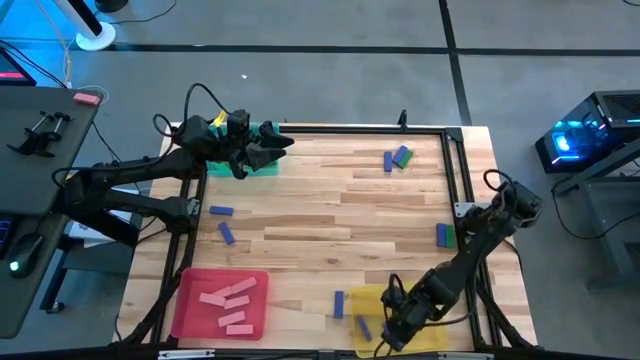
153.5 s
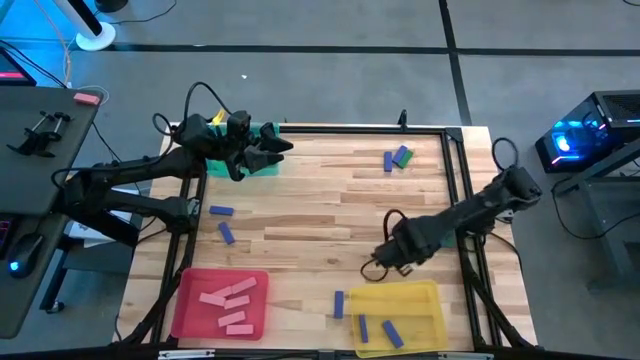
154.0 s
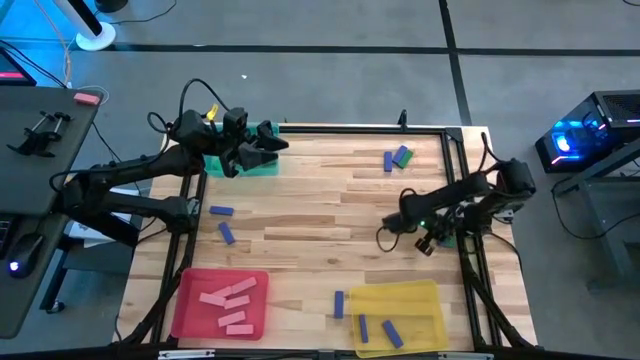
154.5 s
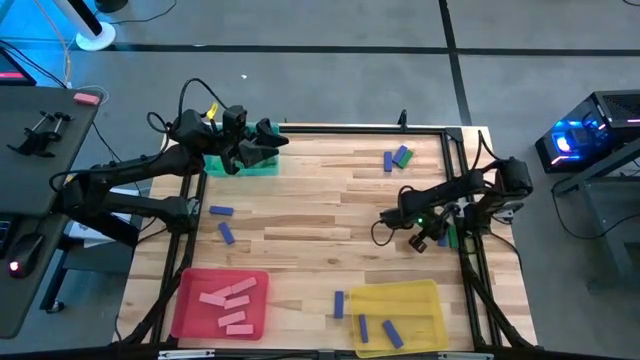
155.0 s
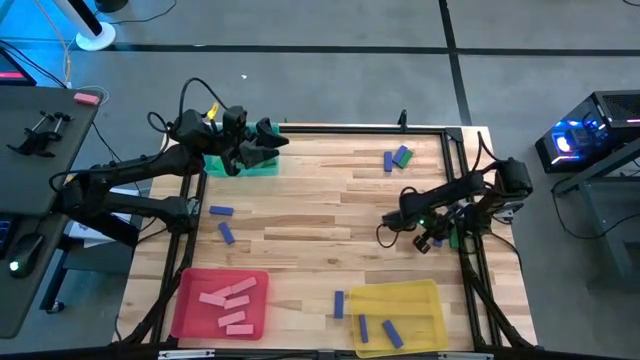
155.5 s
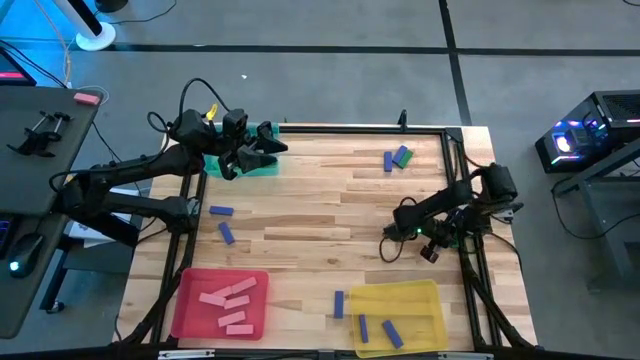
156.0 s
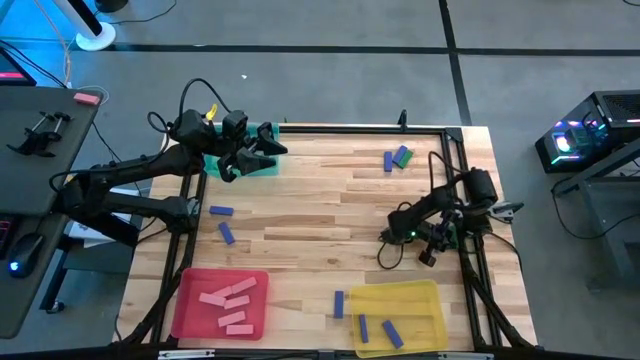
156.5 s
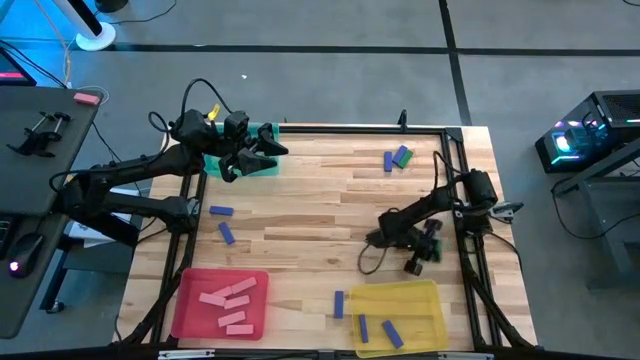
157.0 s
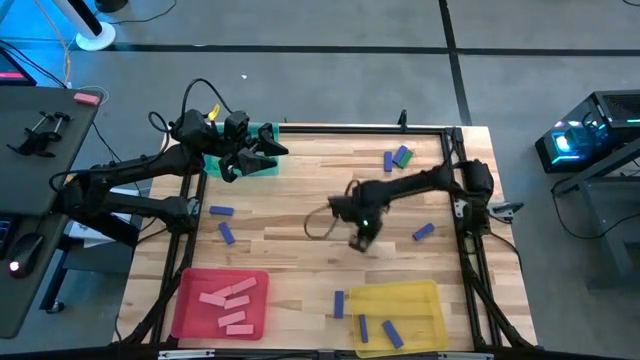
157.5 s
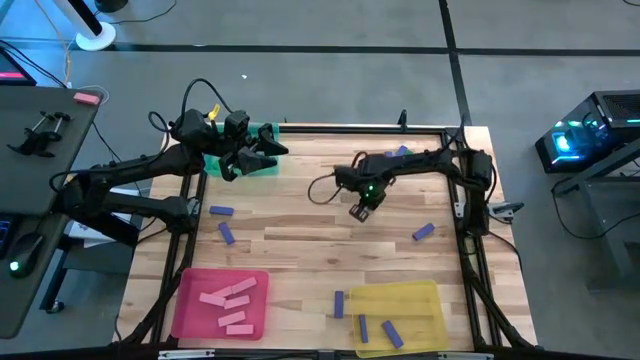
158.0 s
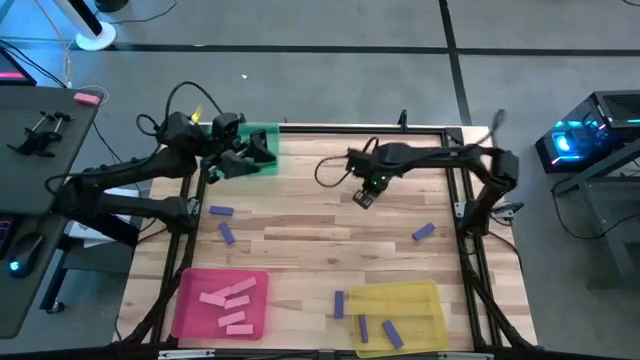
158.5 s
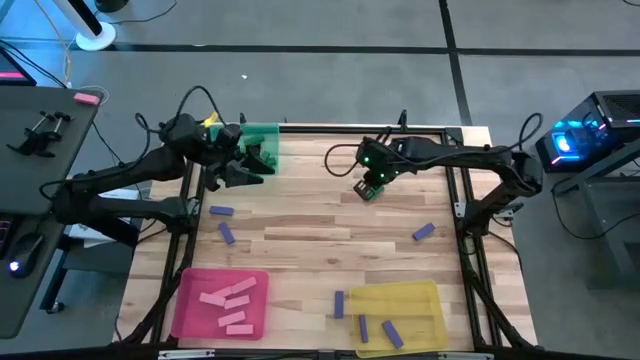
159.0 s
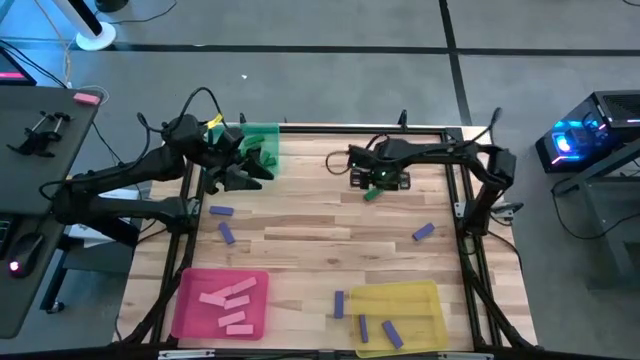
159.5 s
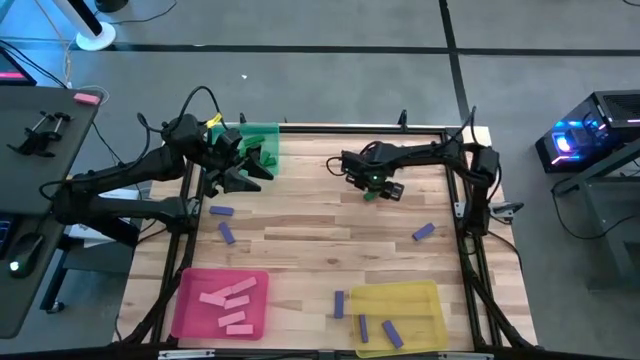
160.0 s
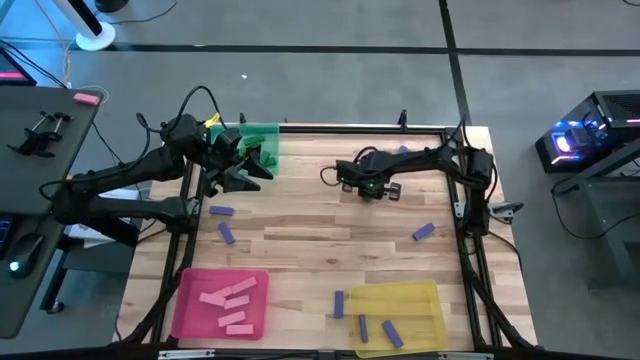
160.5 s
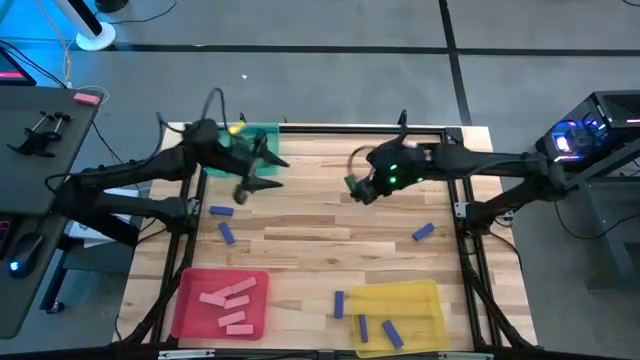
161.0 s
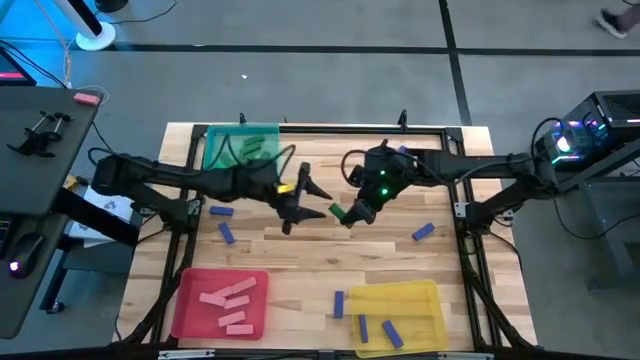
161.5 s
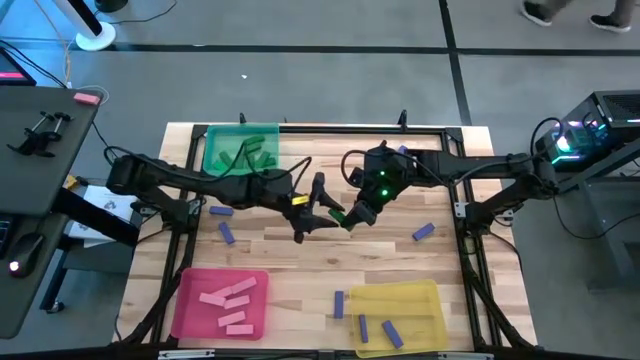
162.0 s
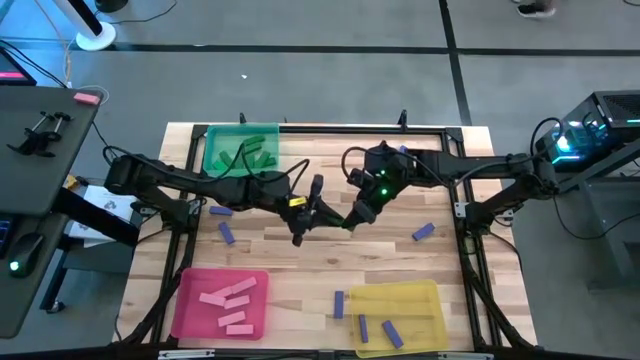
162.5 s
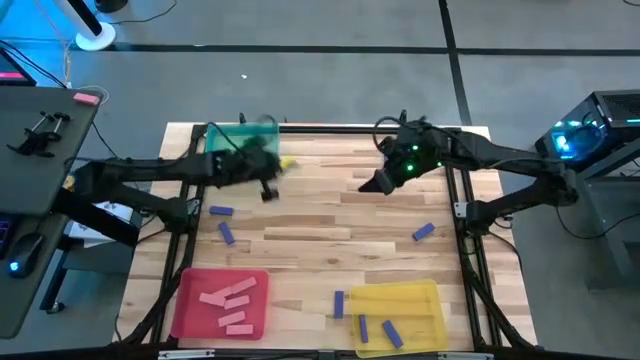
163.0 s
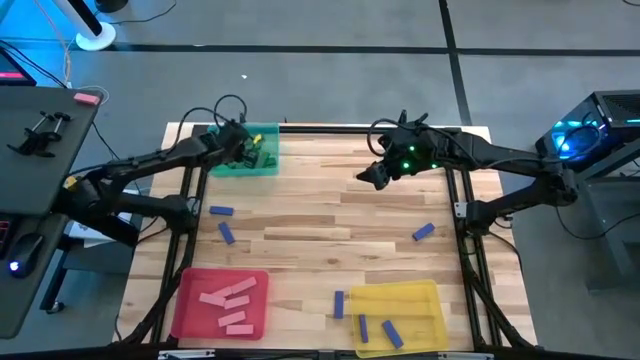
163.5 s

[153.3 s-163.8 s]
Task: Sort blocks
Put the green block into the green bin

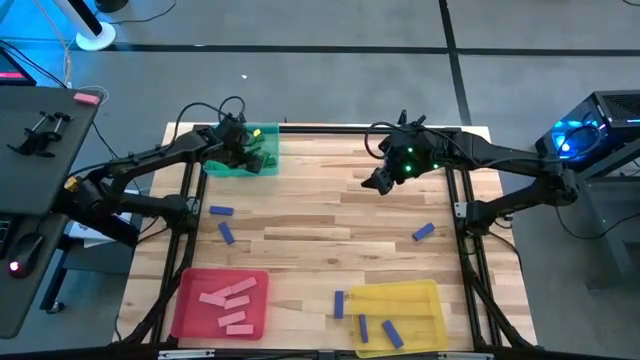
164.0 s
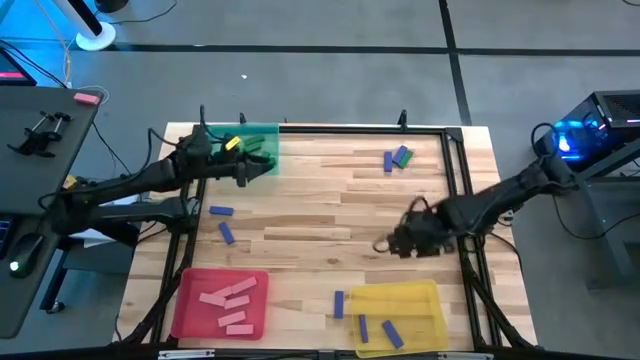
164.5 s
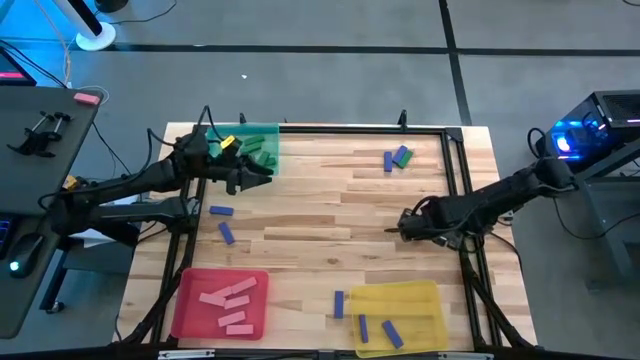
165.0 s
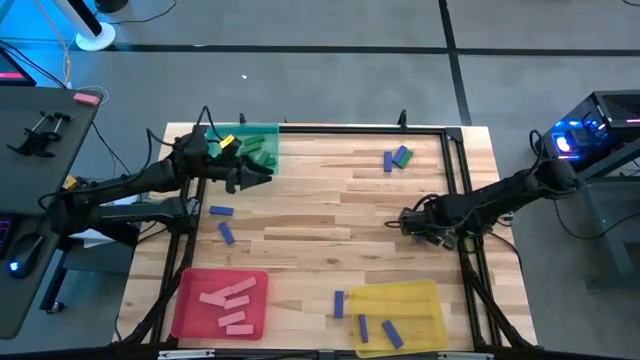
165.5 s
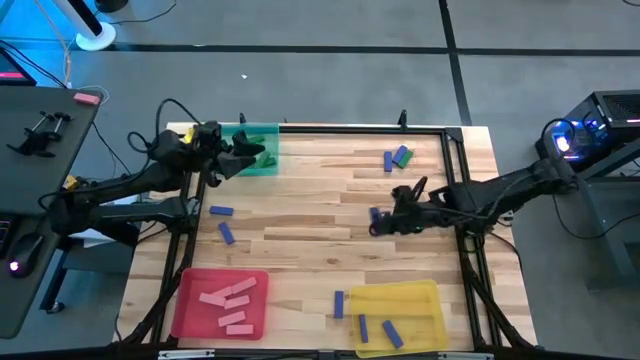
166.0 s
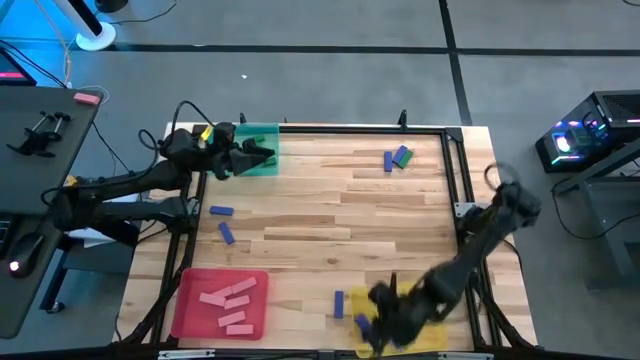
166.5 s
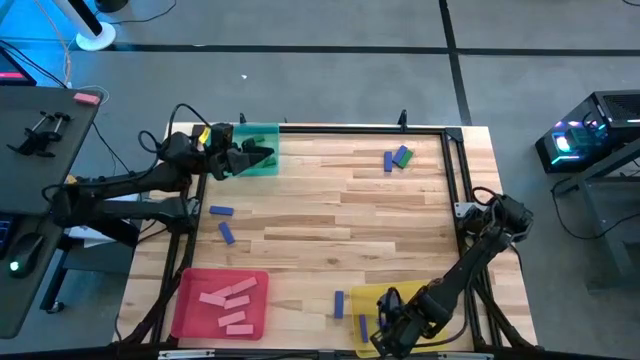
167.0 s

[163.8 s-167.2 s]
Put the blue block into the yellow bin

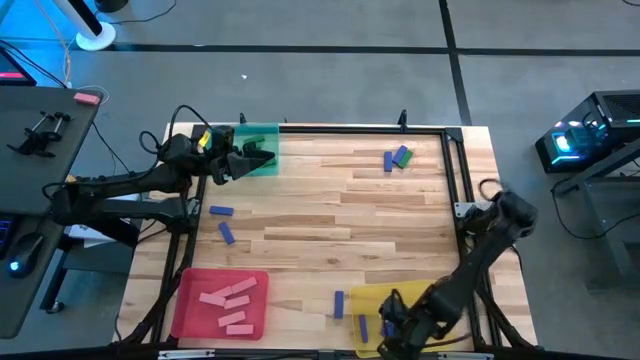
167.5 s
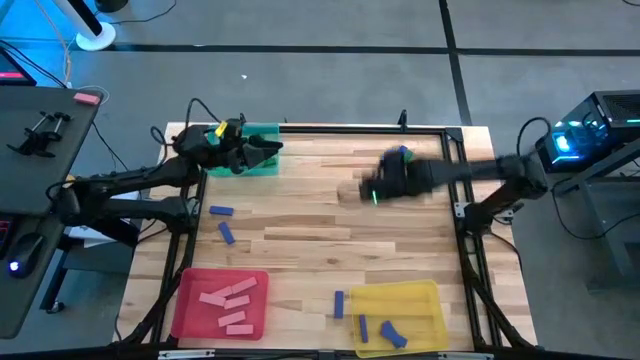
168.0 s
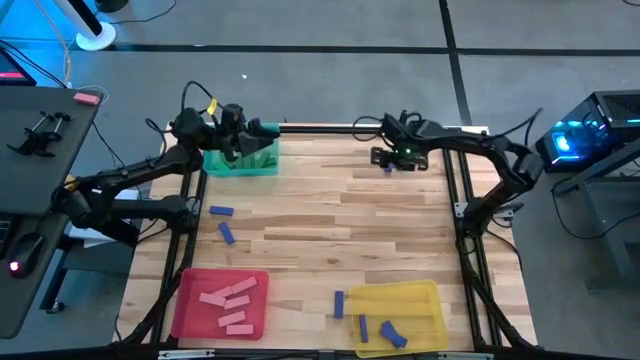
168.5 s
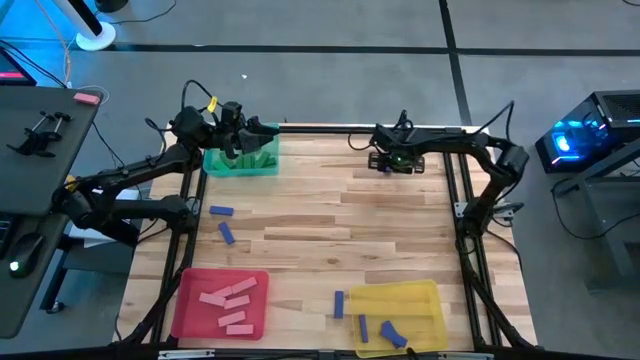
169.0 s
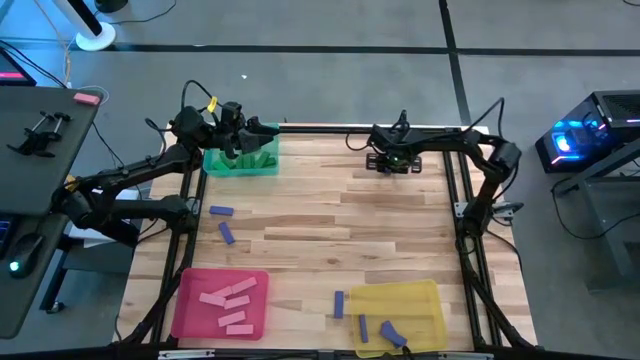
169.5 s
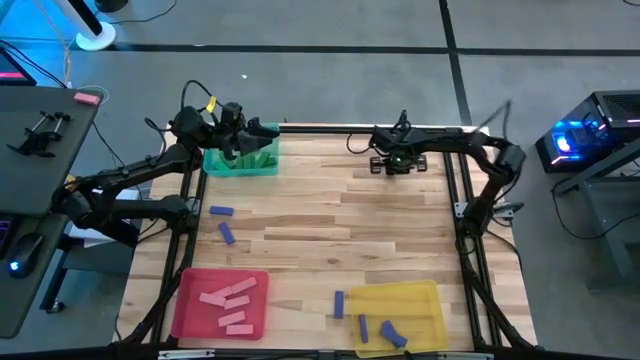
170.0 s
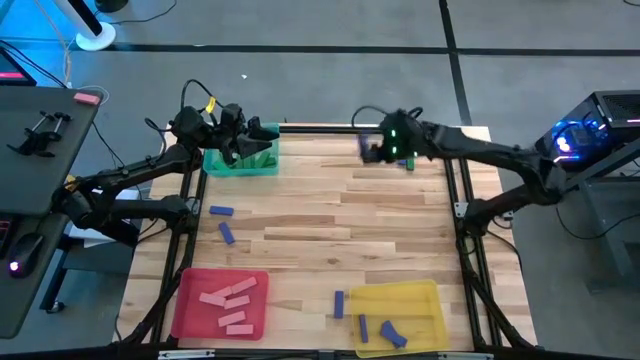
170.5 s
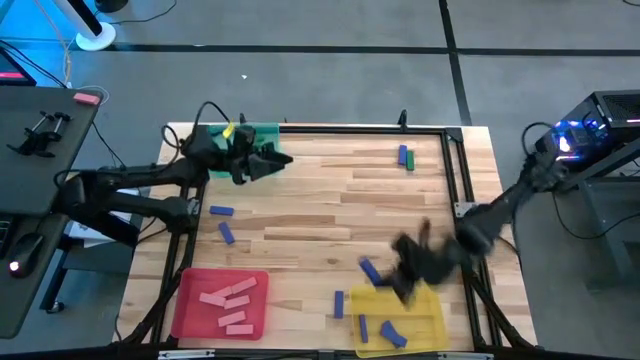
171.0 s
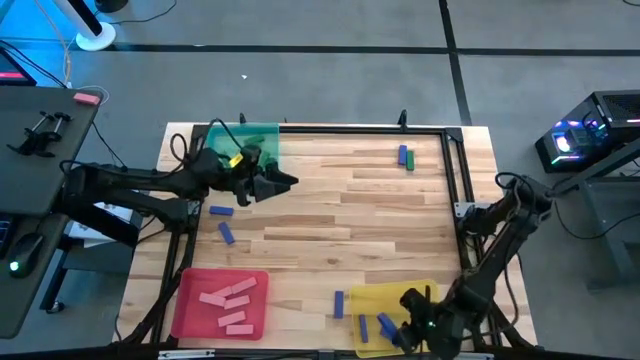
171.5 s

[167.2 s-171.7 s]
Put the blue block into the yellow bin

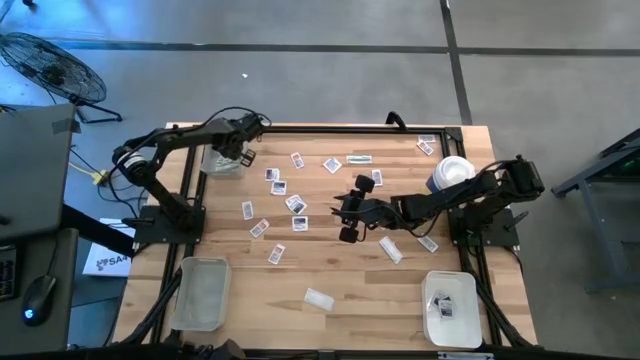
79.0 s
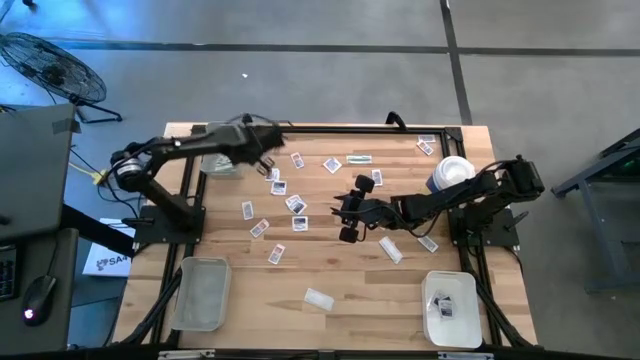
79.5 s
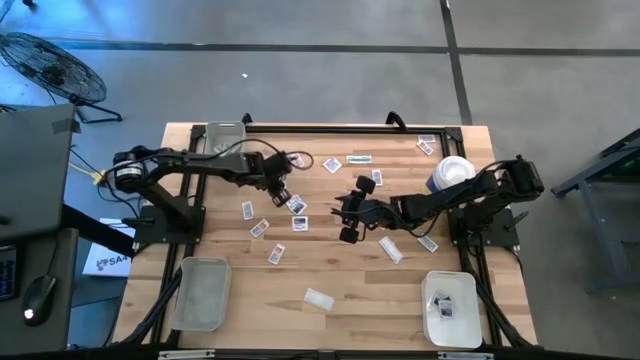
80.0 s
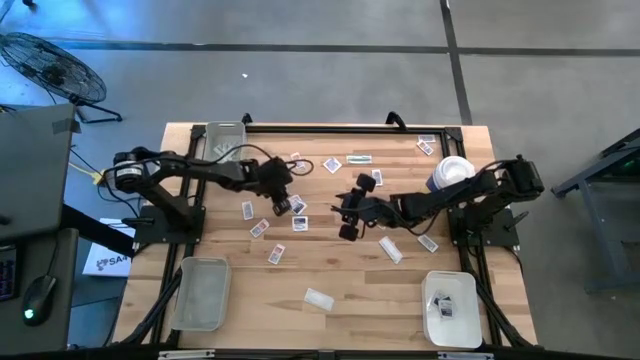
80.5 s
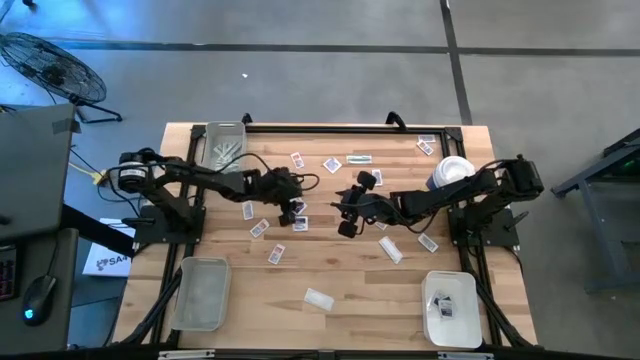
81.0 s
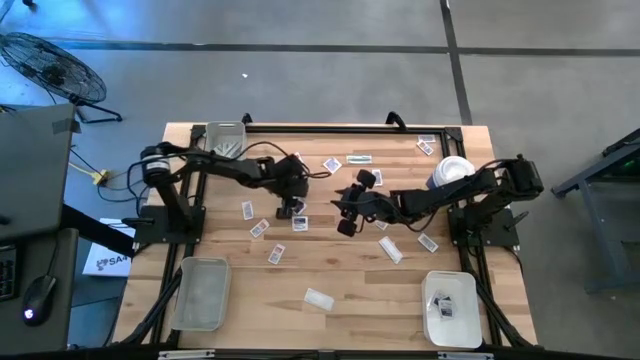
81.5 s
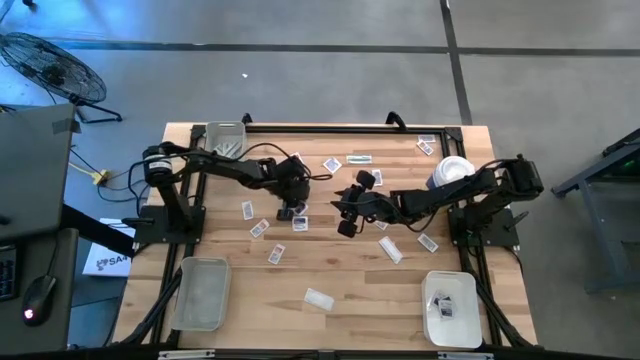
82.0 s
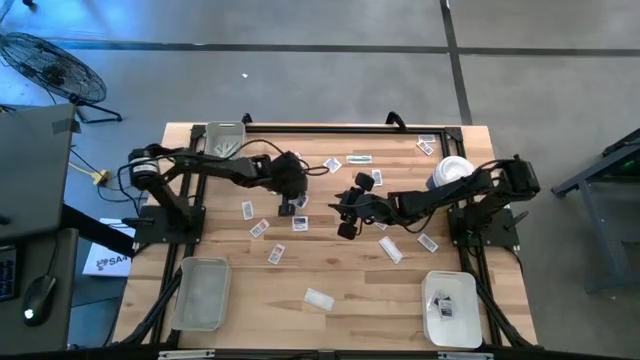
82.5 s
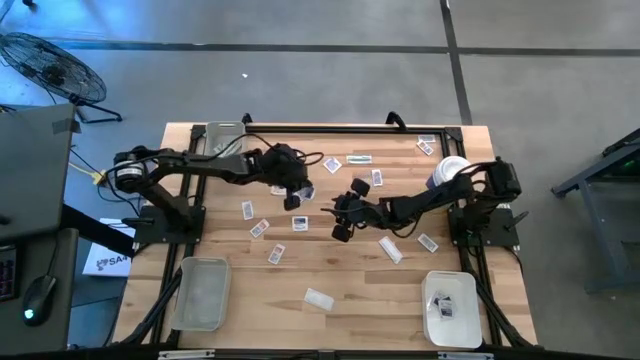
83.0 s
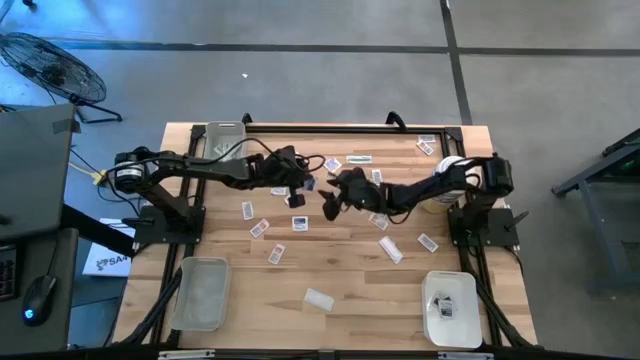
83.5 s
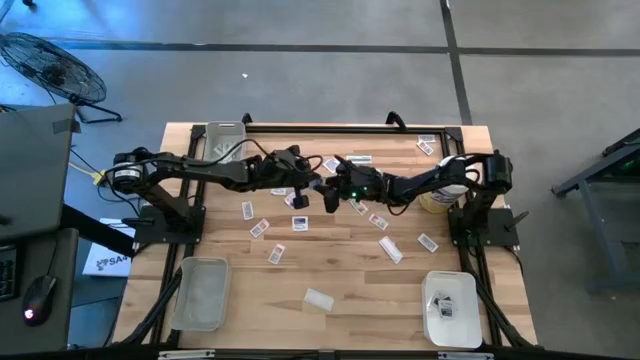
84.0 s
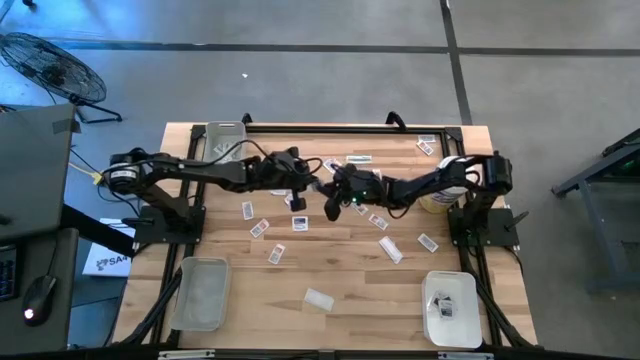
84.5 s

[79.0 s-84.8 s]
Task: Pick & Place First Aid Supplies
Put the blue alcohol pad into the white bin
